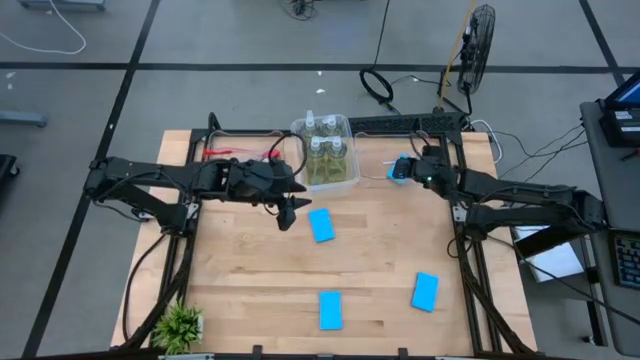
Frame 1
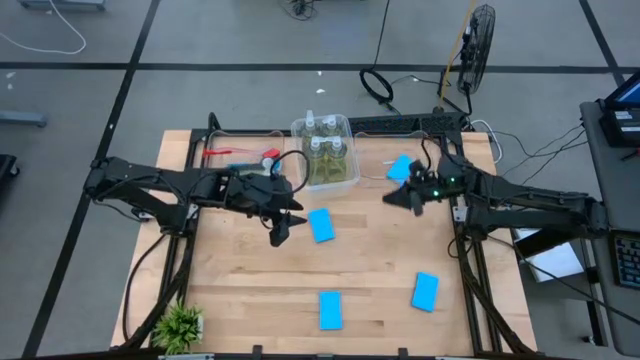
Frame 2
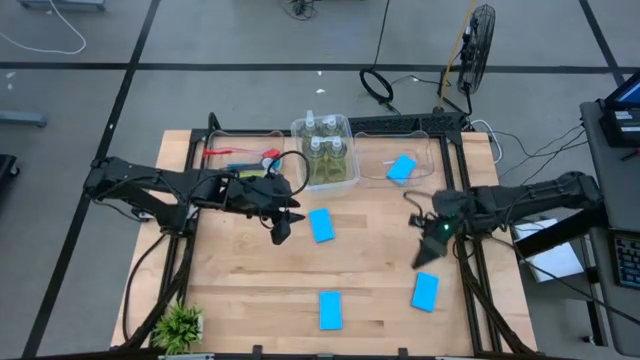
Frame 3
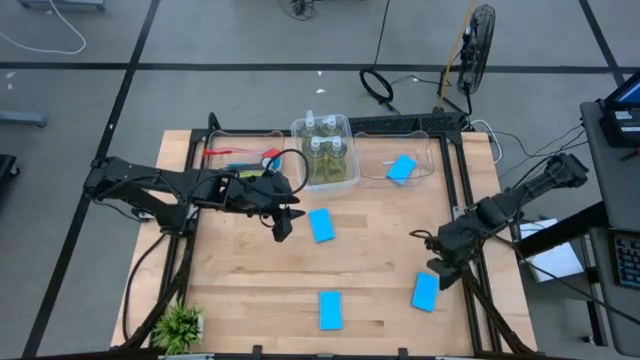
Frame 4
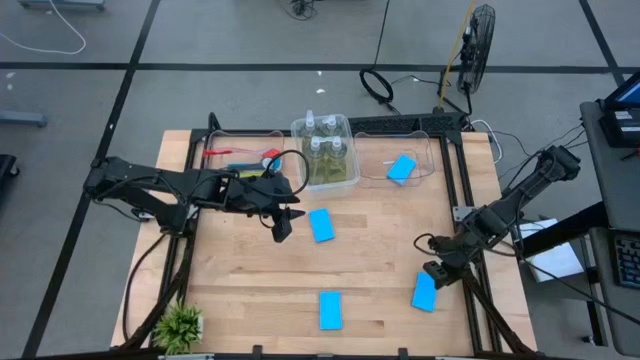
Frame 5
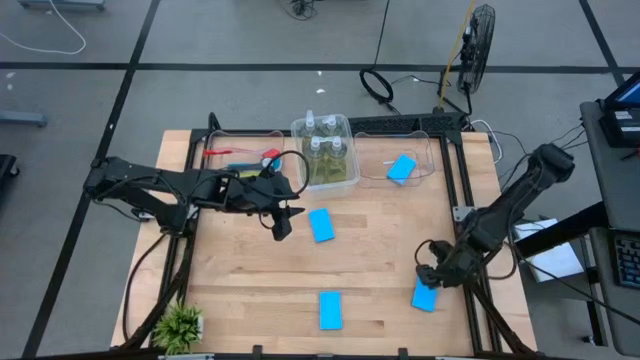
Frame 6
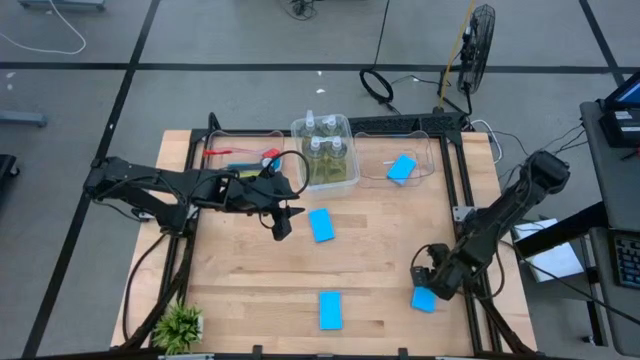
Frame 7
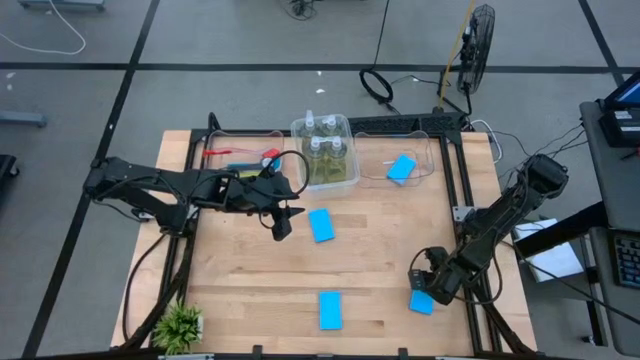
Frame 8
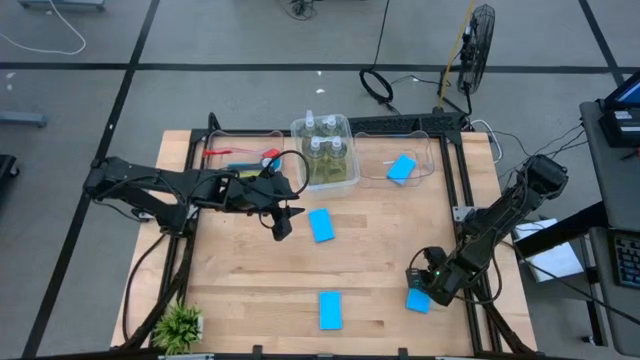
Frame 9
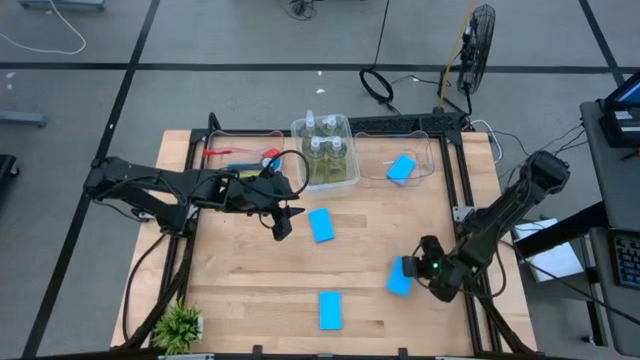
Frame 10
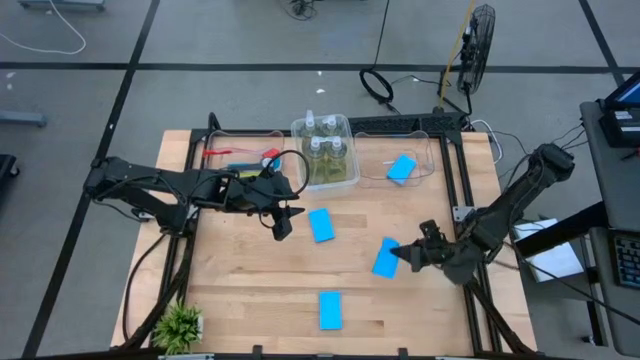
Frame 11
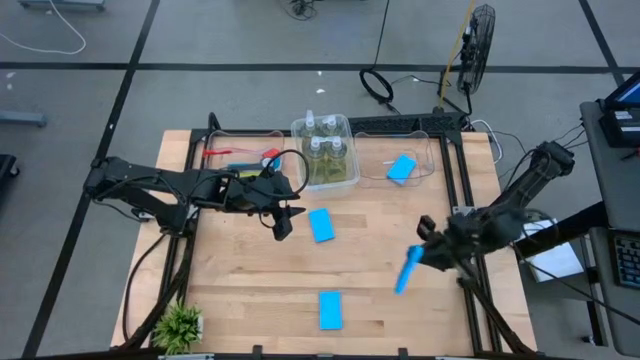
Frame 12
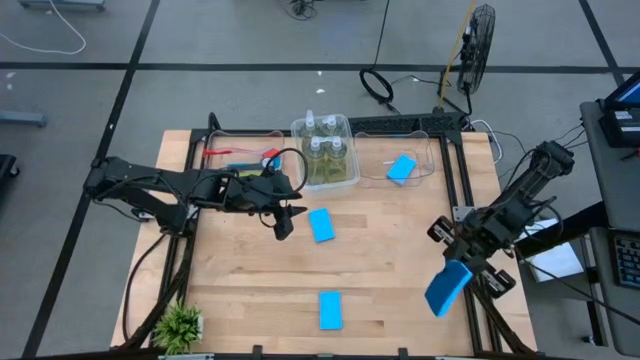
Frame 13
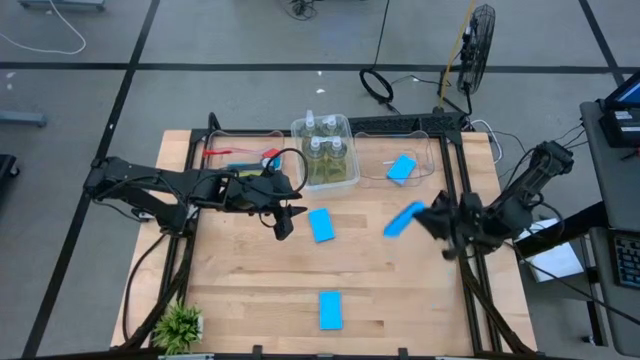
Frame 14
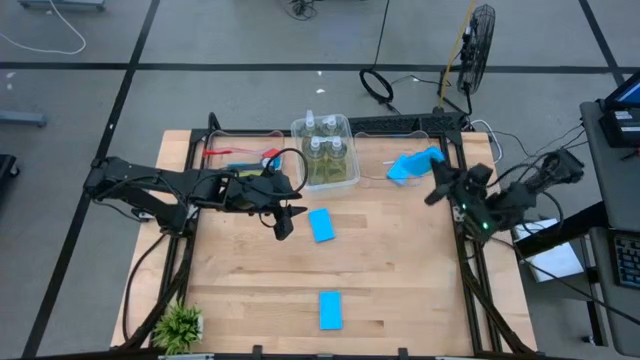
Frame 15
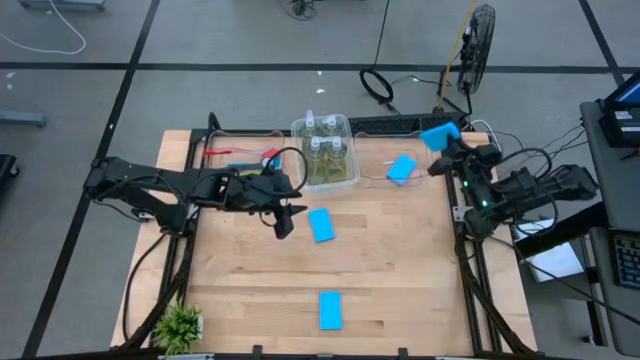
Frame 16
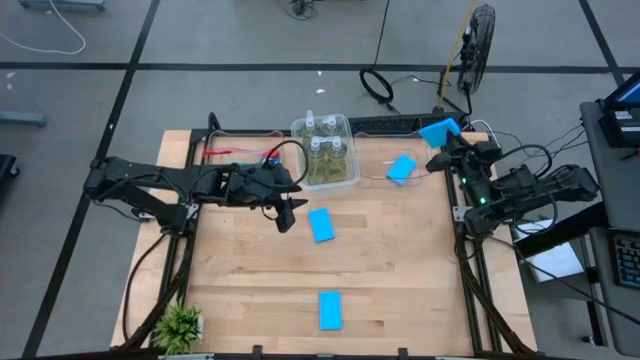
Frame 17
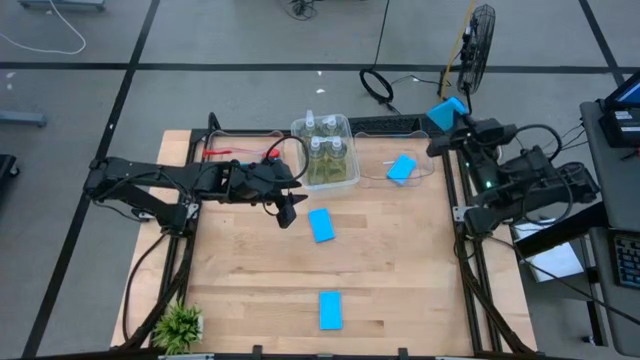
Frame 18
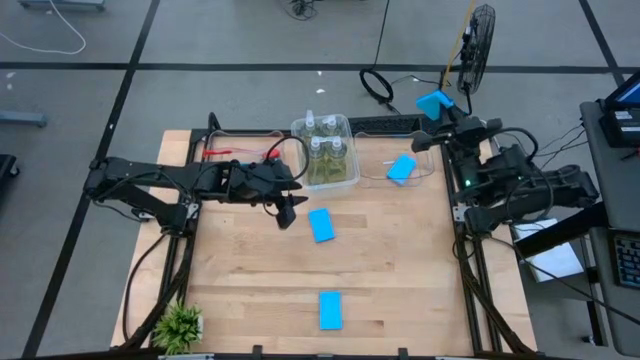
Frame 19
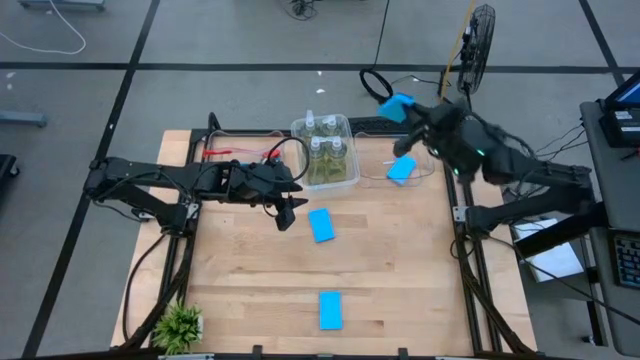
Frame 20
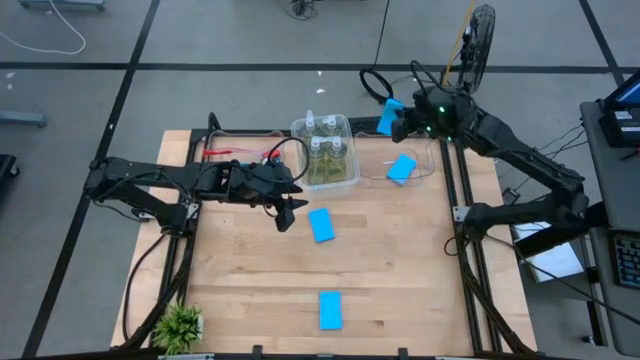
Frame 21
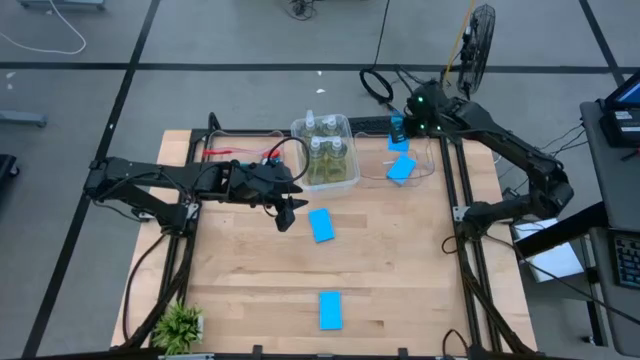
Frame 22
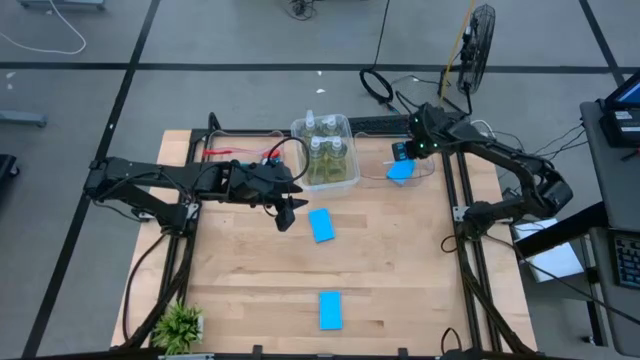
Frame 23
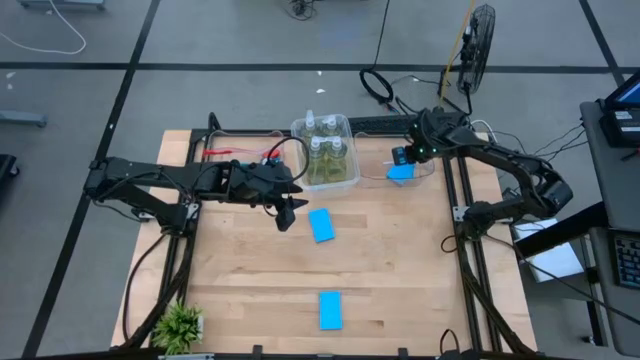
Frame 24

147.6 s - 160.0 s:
Task: Pick & Place Kitchen Sink Supplies
Put the blue sponge into the right transparent bin

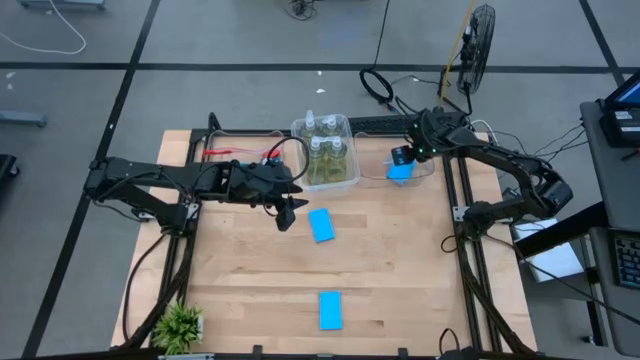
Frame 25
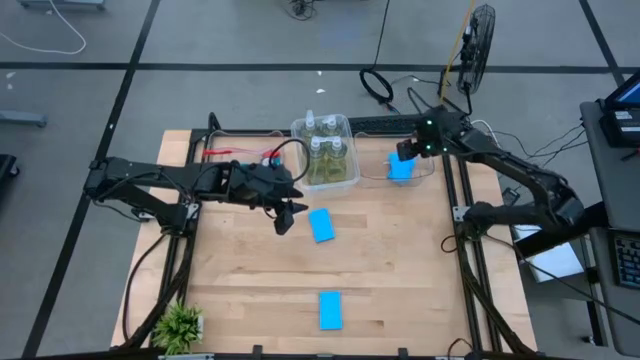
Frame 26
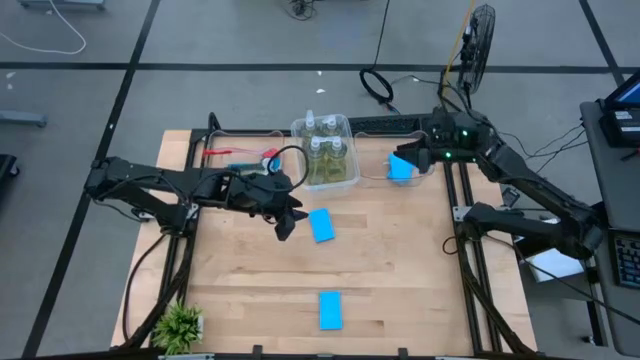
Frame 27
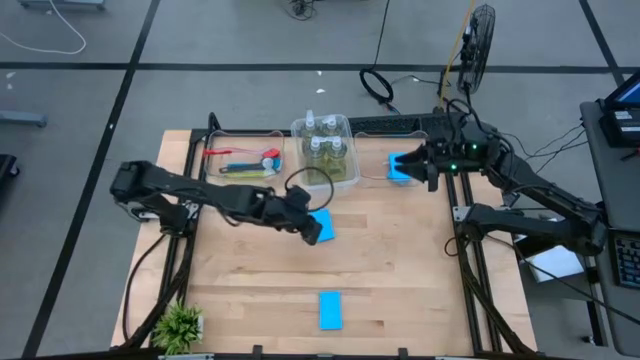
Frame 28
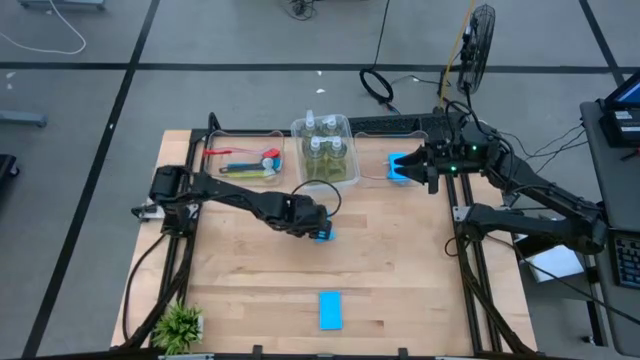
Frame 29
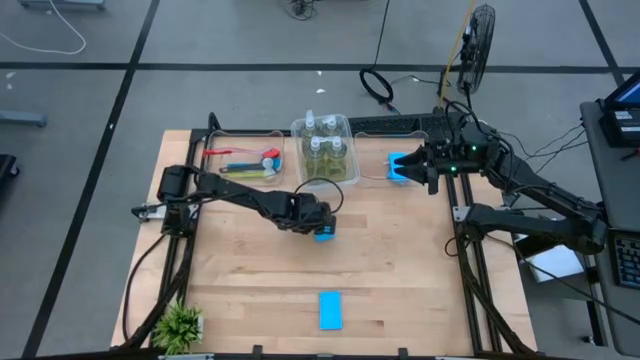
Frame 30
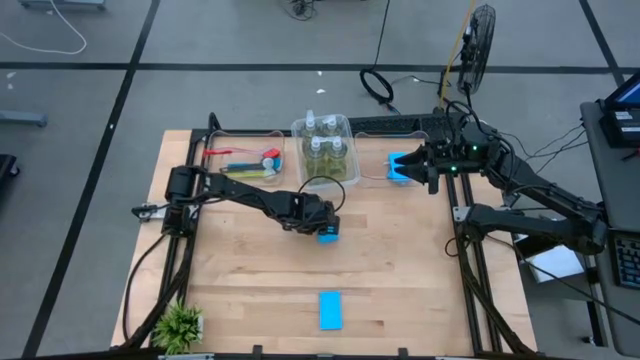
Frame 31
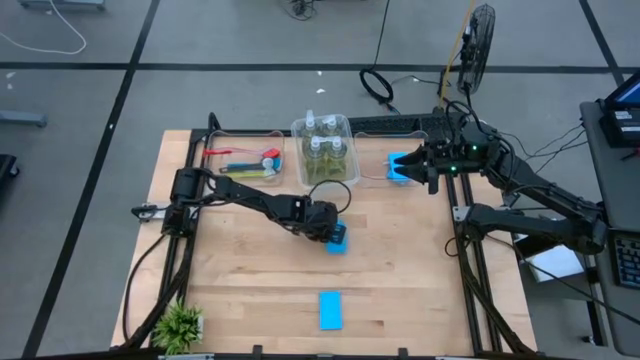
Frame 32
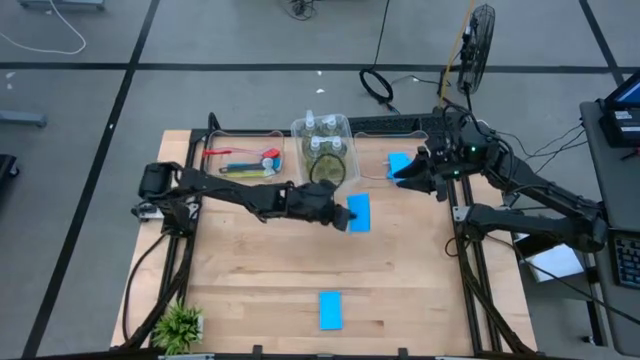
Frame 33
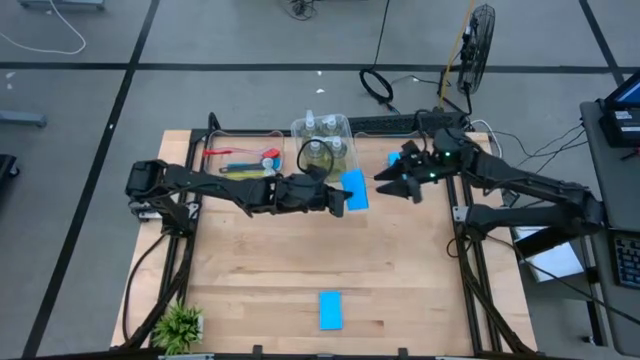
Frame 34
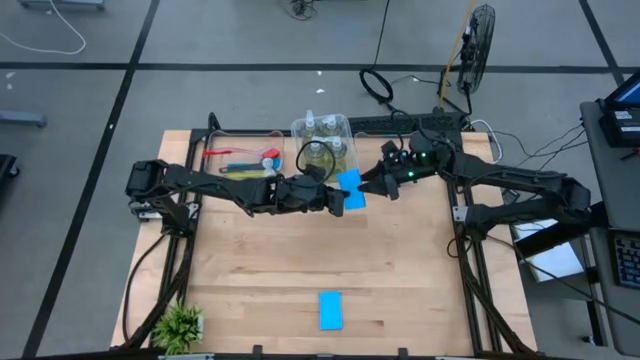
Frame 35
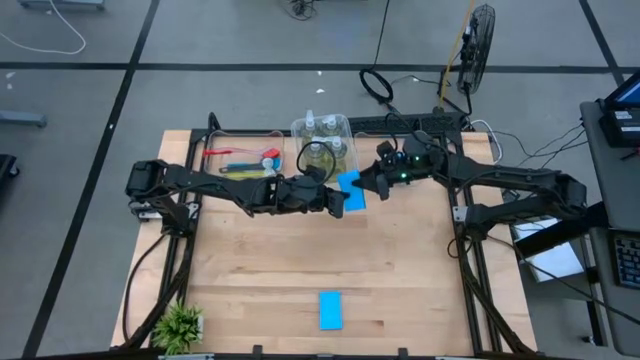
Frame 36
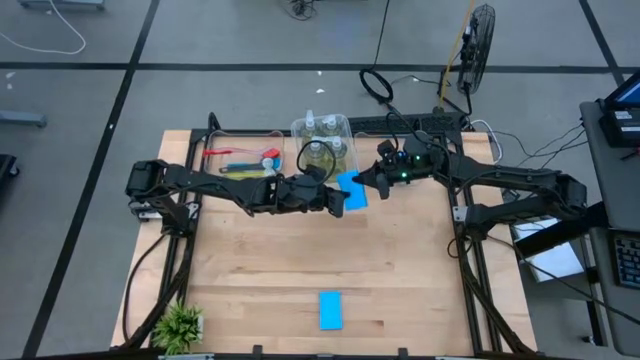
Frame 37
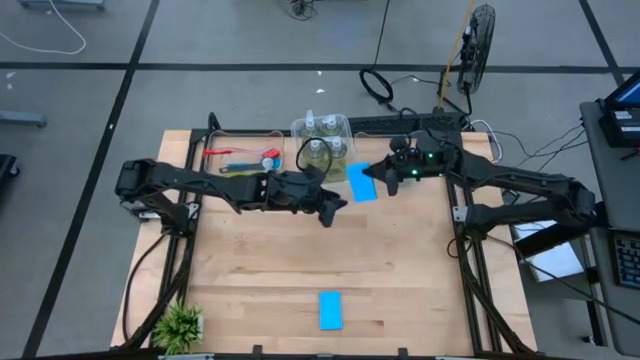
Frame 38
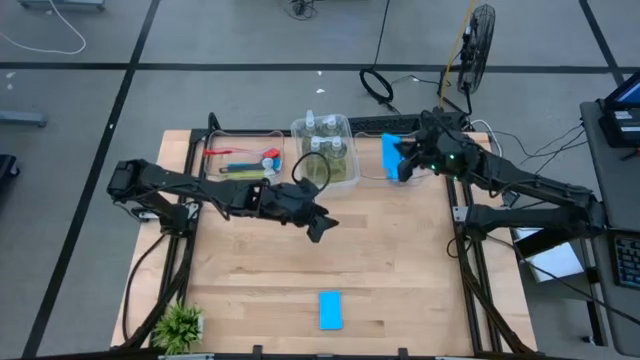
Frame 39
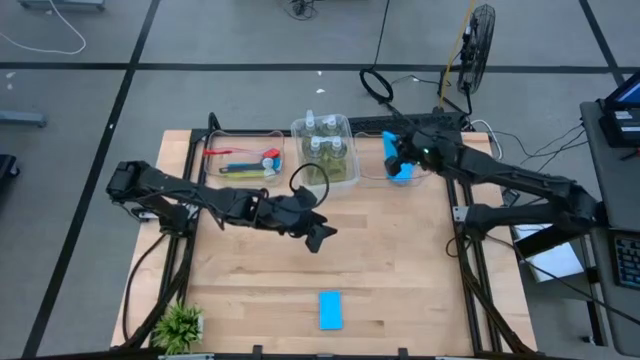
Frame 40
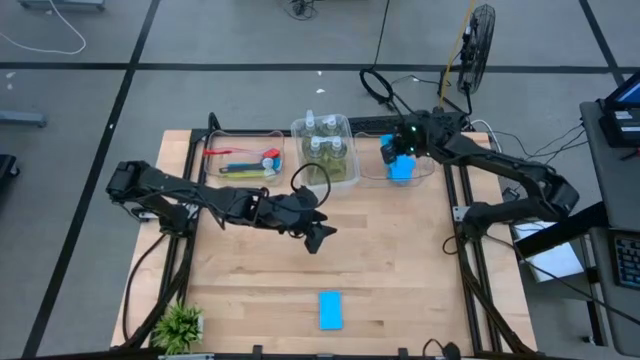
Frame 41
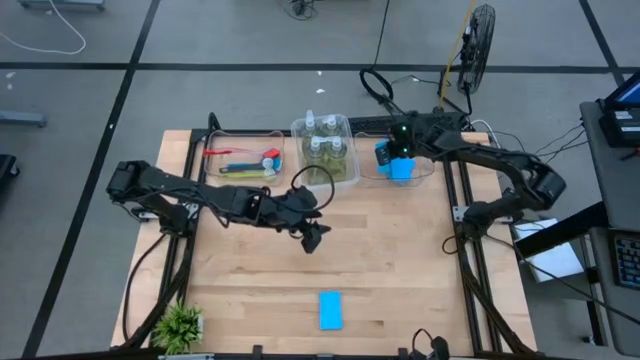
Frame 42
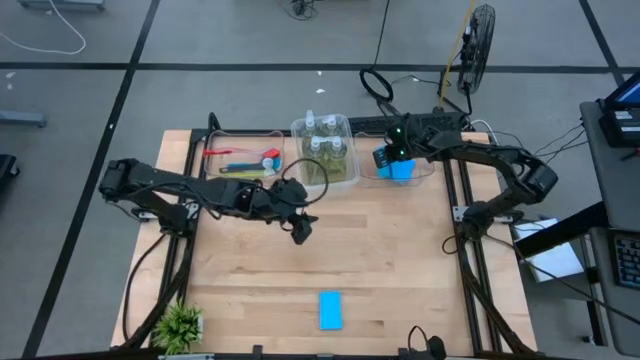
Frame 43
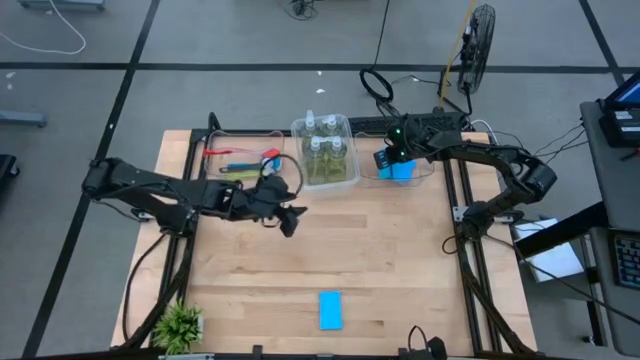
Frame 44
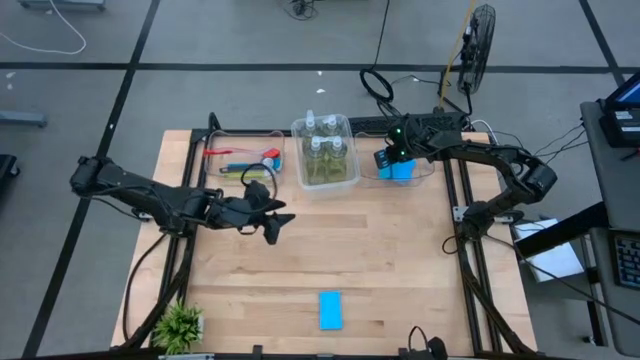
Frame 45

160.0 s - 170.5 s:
Put the blue sponge into the right transparent bin
